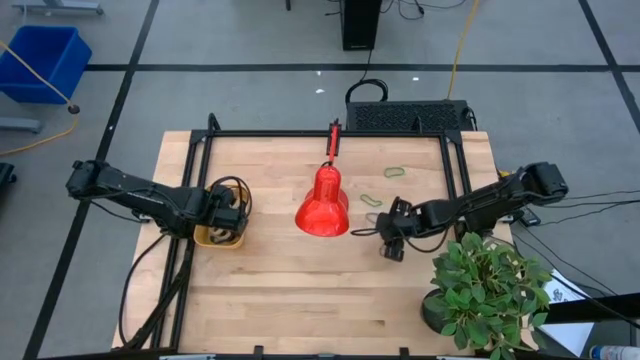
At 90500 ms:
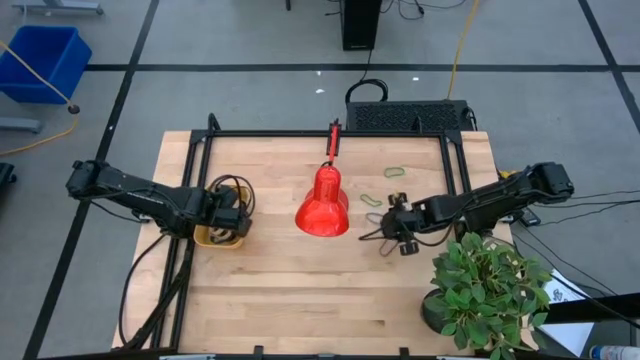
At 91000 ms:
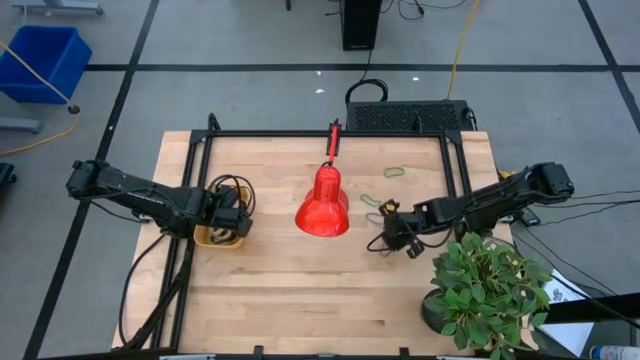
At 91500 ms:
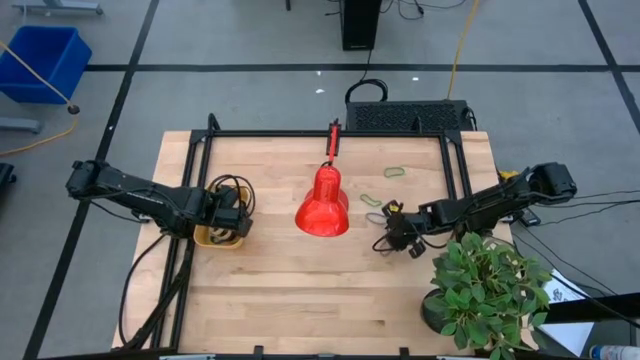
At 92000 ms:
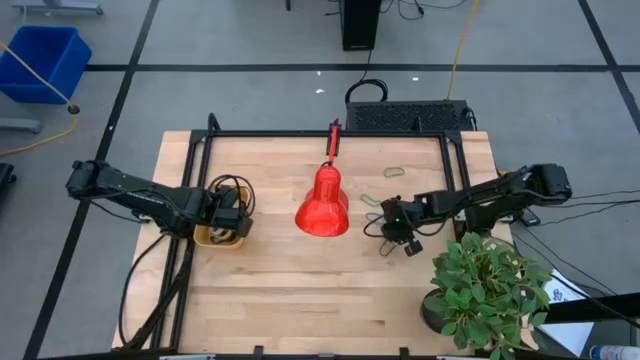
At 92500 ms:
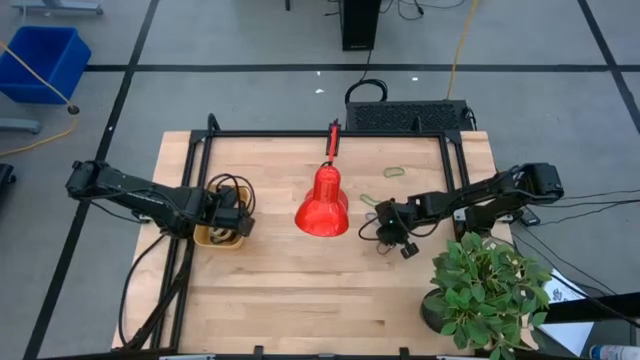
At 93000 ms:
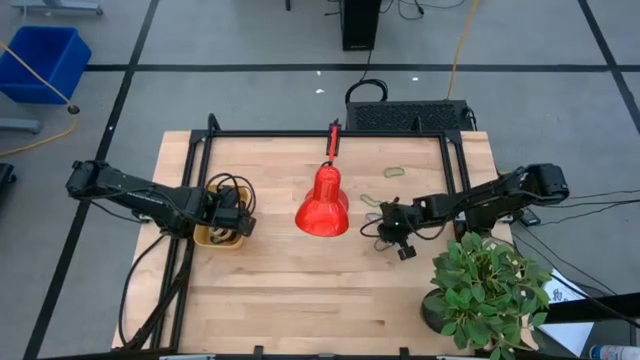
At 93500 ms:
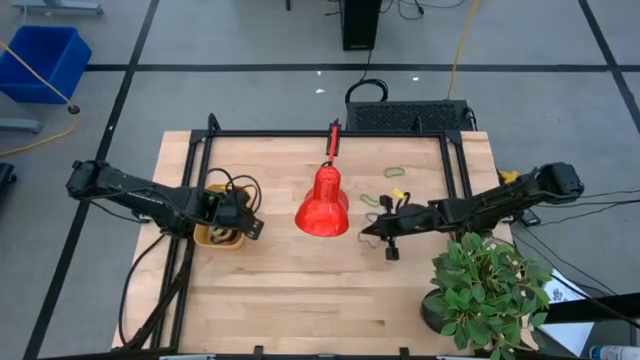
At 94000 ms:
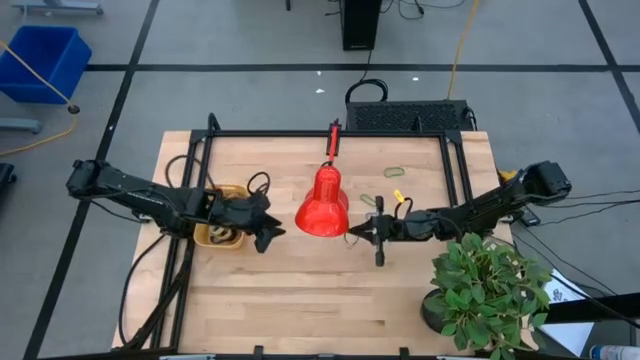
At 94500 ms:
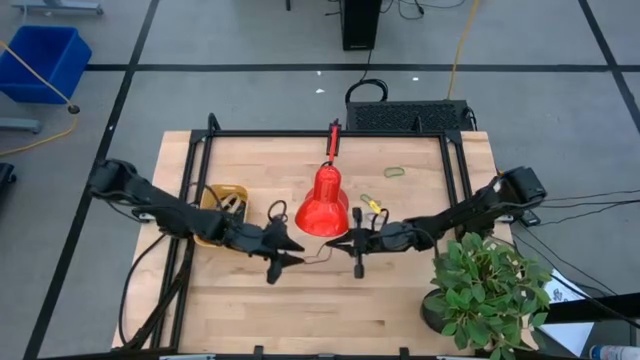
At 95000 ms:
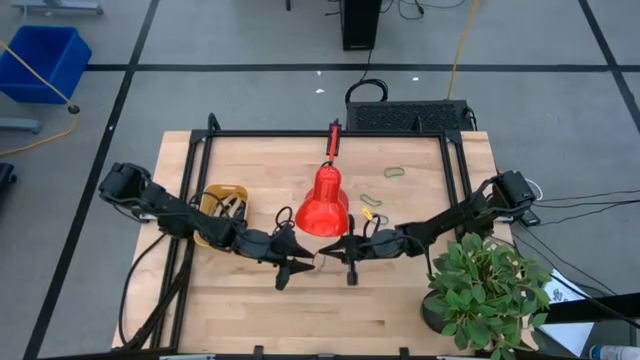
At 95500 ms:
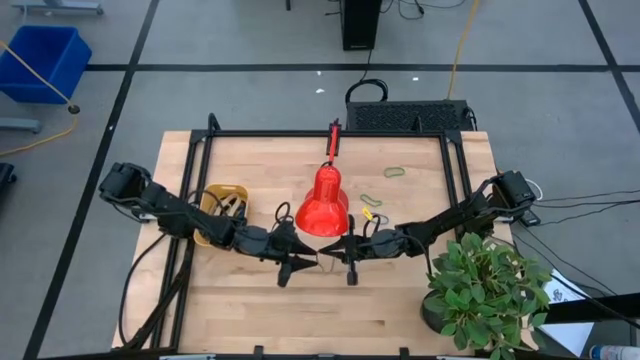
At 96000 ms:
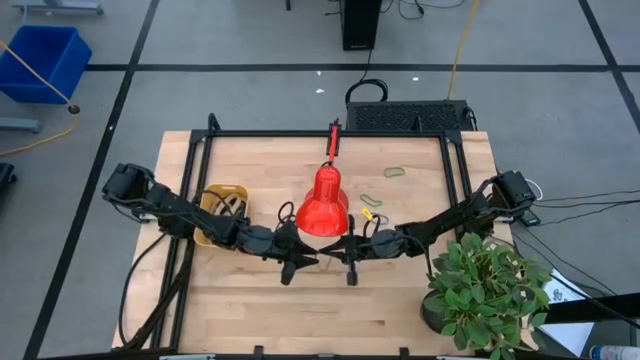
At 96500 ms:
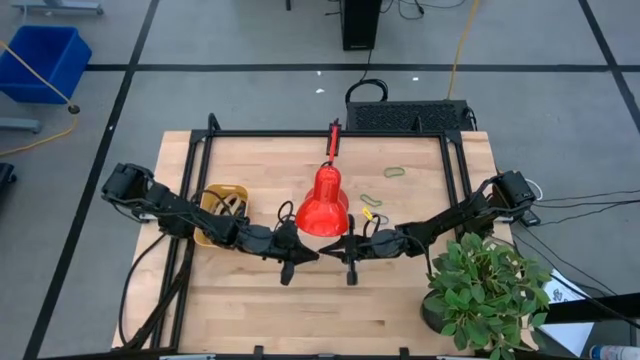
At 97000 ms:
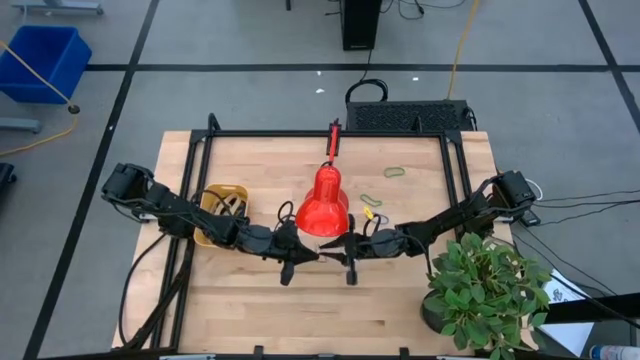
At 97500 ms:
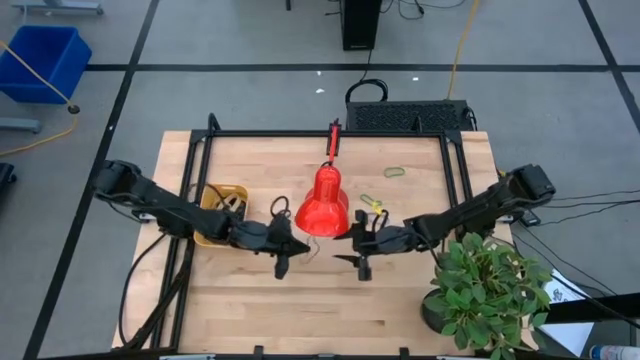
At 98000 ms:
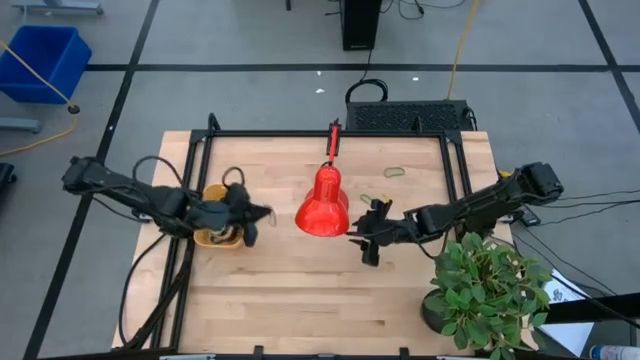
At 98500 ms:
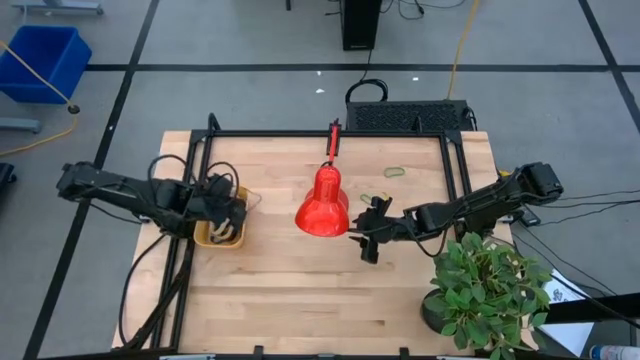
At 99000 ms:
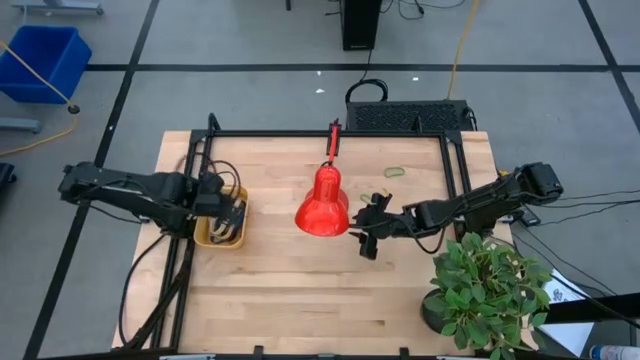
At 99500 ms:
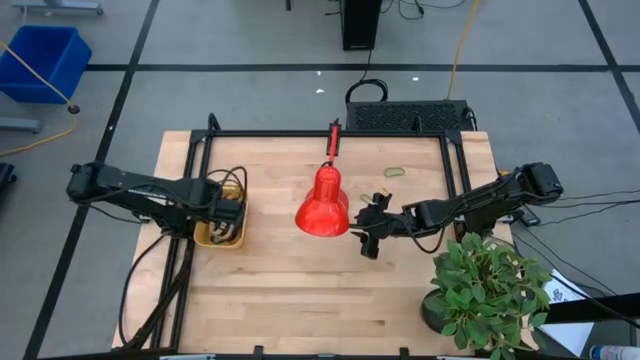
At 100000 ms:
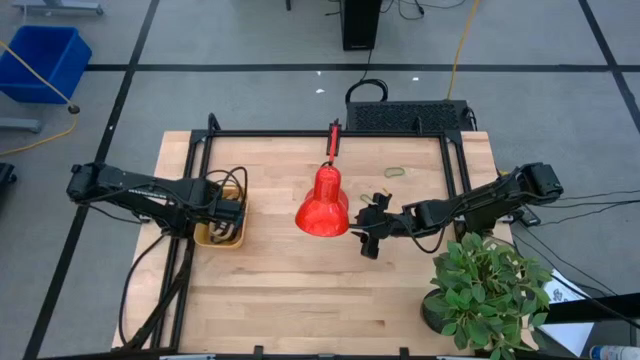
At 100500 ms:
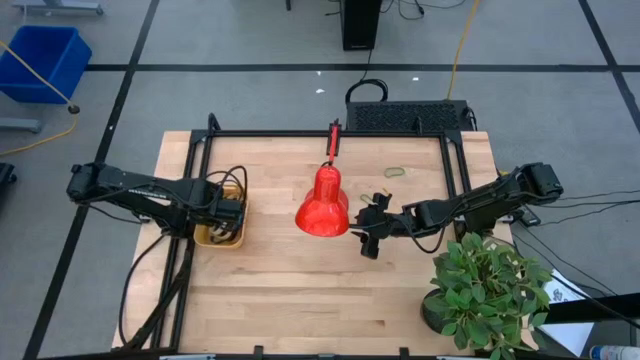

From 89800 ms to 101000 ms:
Task: Pick and place rubber bands into bin
Put the purple rubber band into the yellow bin

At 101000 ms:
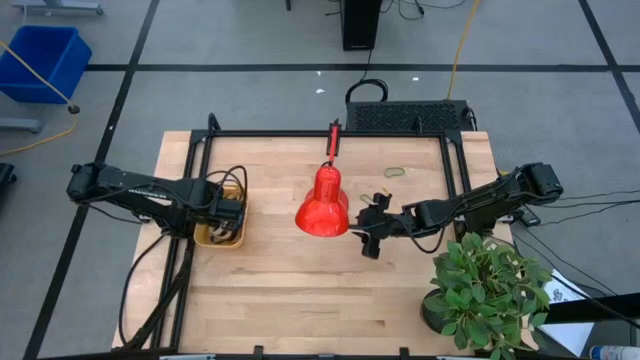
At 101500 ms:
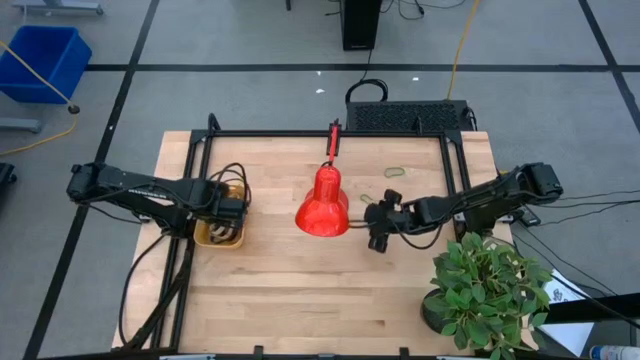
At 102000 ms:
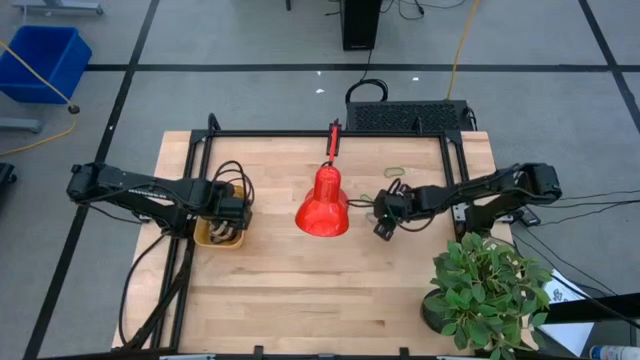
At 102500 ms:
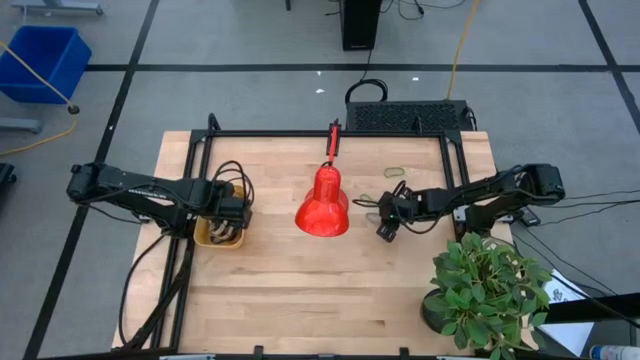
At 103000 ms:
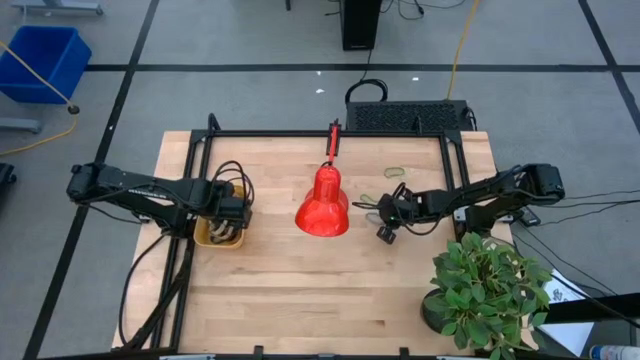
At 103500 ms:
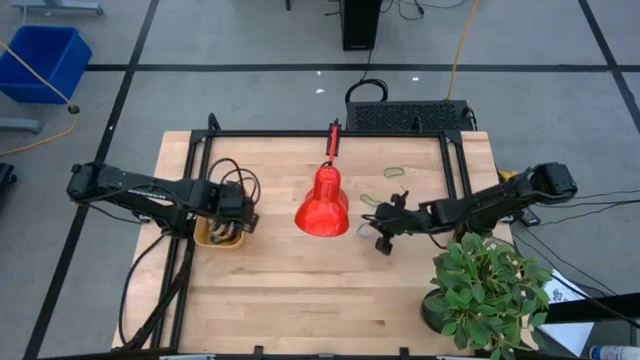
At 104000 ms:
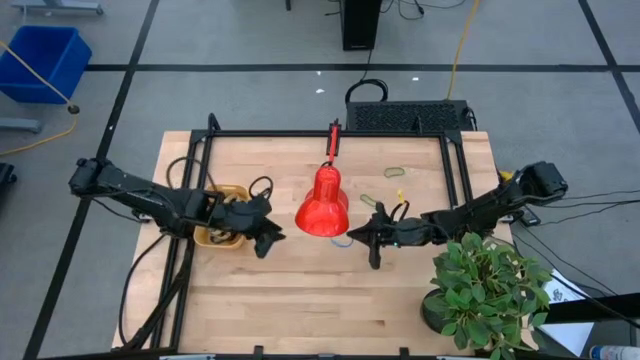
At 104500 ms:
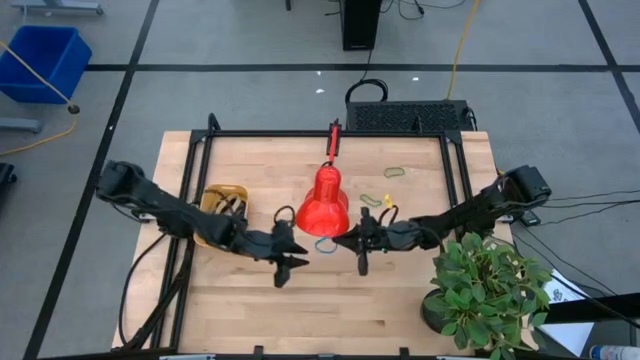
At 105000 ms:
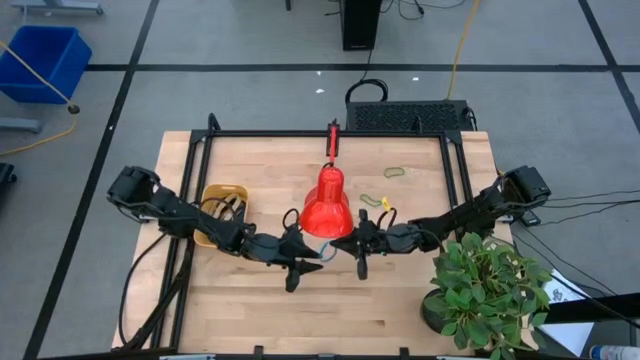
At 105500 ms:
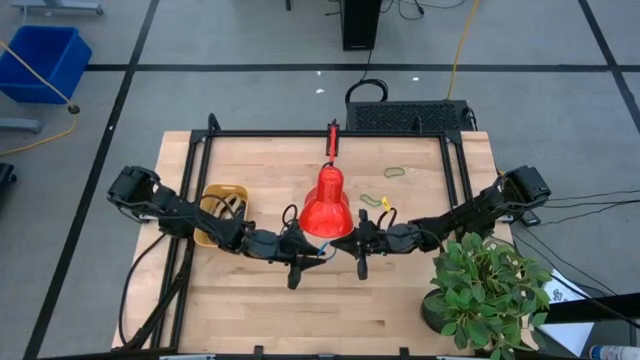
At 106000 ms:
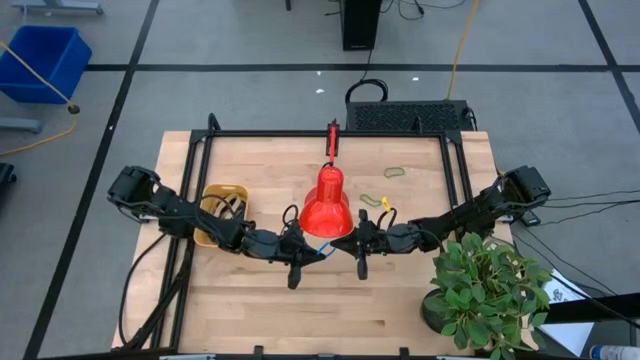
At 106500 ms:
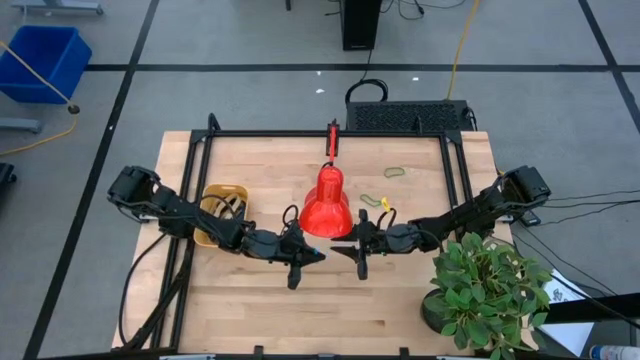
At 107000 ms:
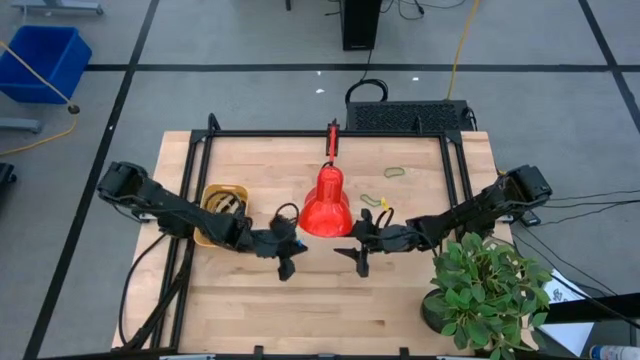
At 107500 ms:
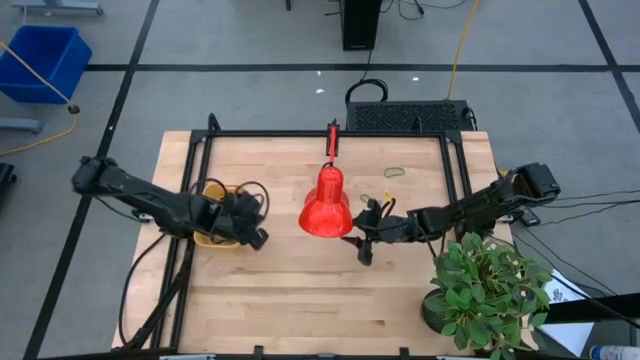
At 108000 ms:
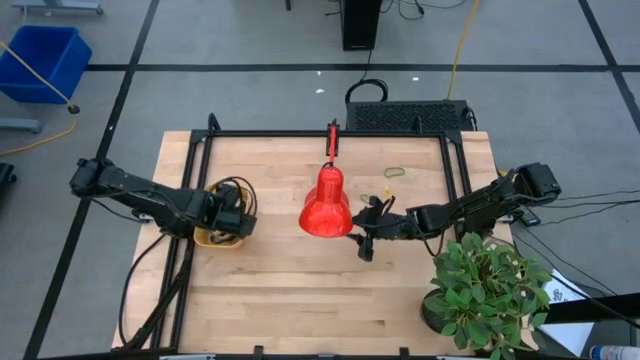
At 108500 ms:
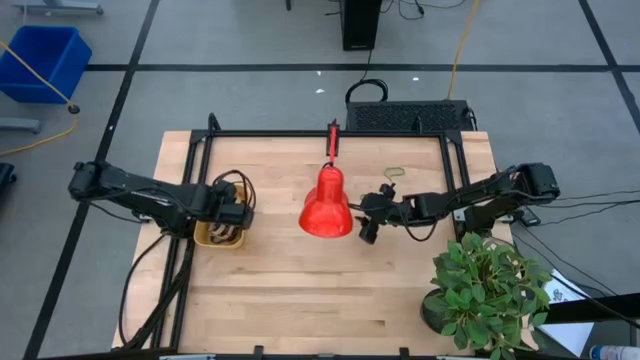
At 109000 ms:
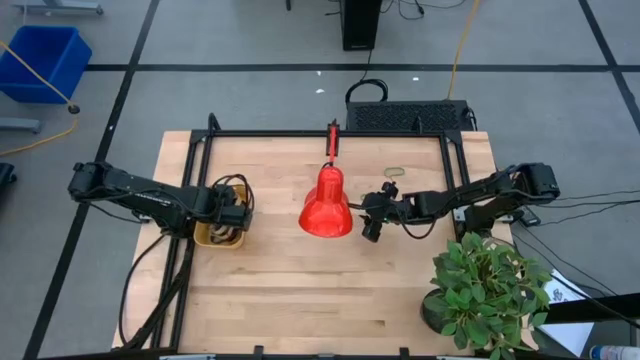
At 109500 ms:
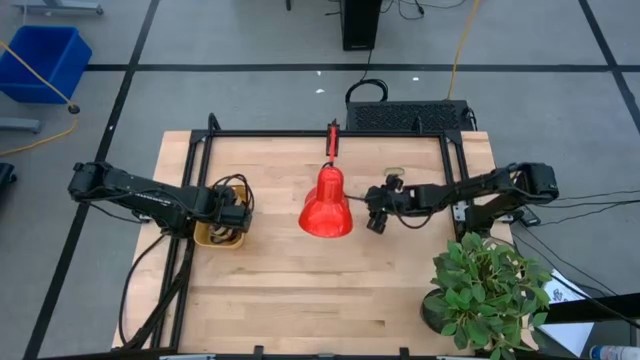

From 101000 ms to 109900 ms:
Put the light blue rubber band into the yellow bin

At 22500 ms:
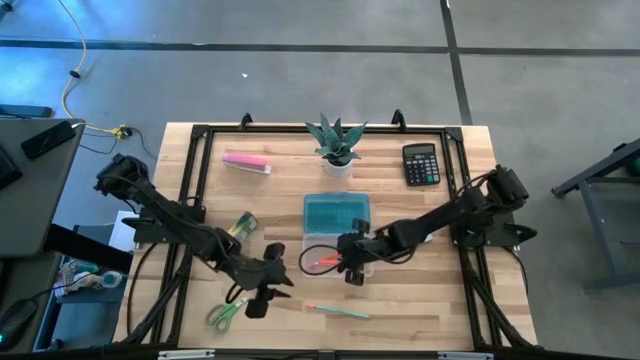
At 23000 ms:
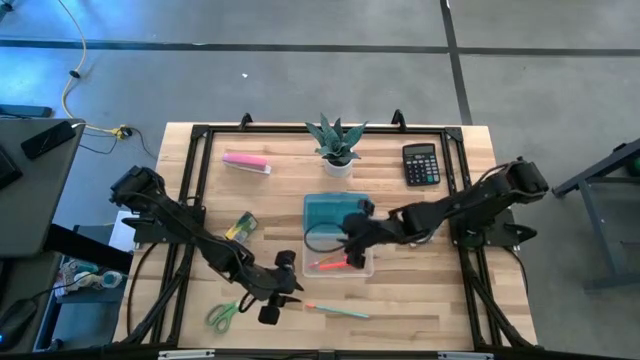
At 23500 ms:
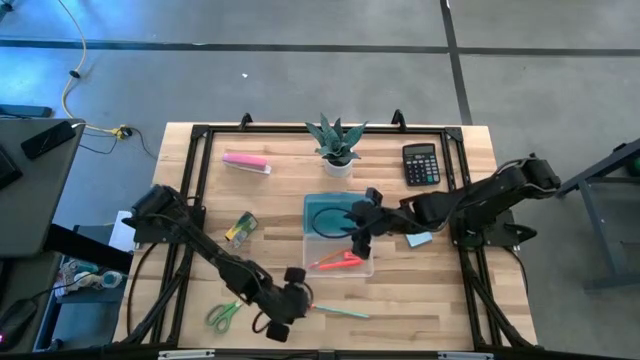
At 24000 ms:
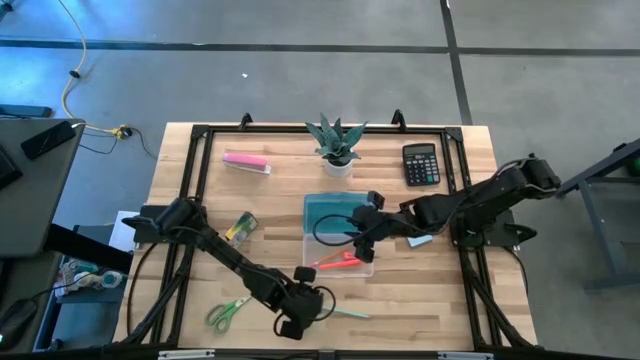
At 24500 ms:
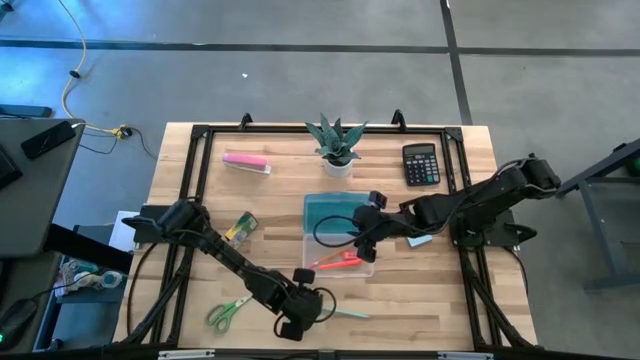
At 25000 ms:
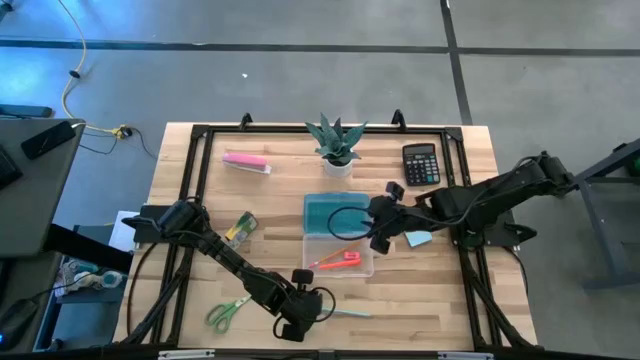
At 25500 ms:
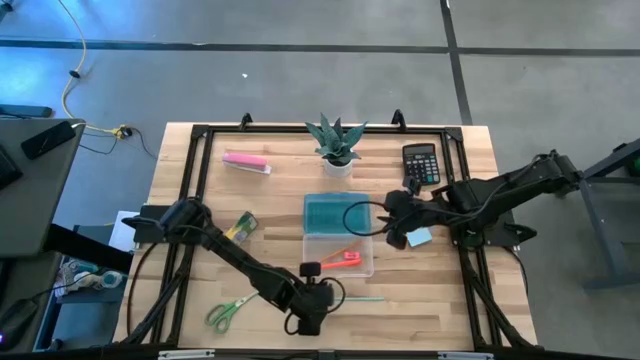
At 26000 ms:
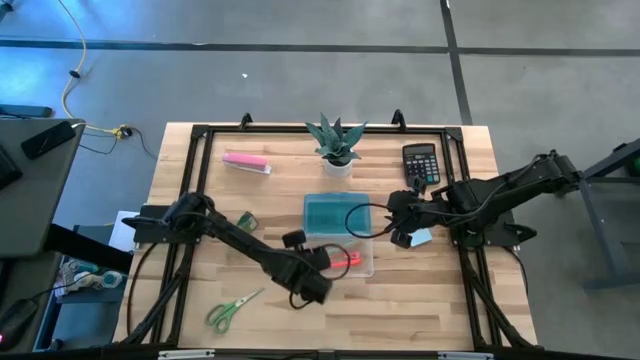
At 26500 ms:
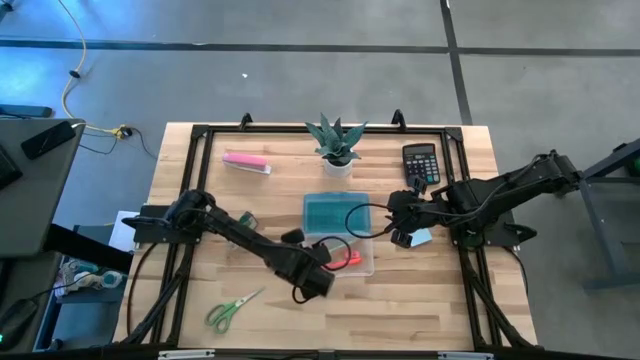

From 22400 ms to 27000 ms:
Task: Pack school essentials
Put the blue pencil into the blue supply box
